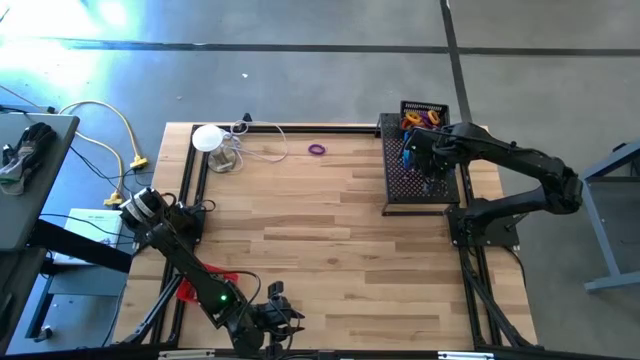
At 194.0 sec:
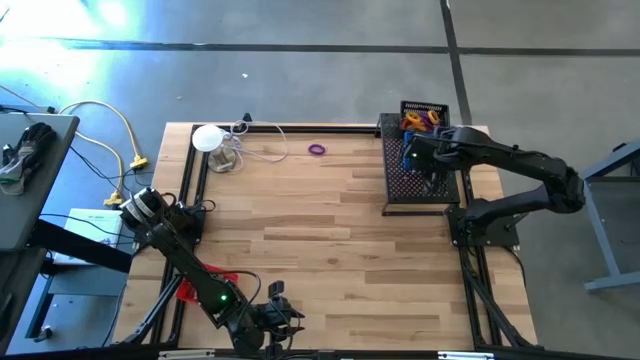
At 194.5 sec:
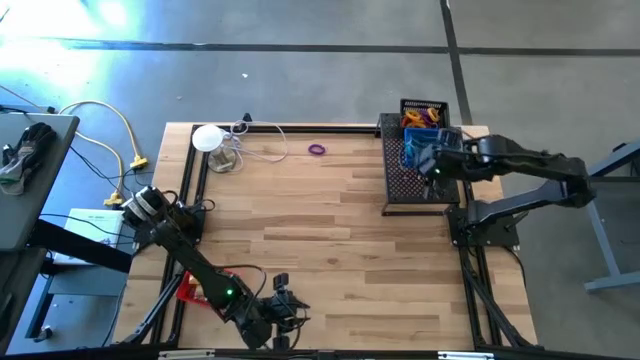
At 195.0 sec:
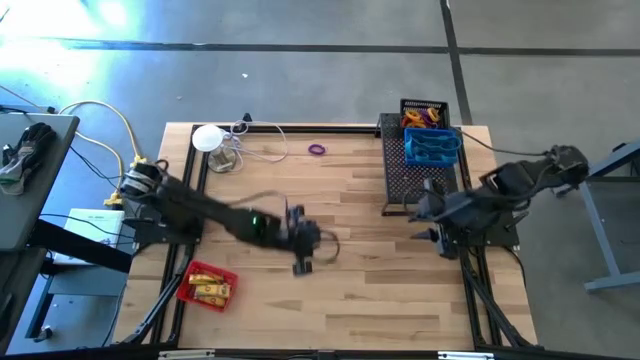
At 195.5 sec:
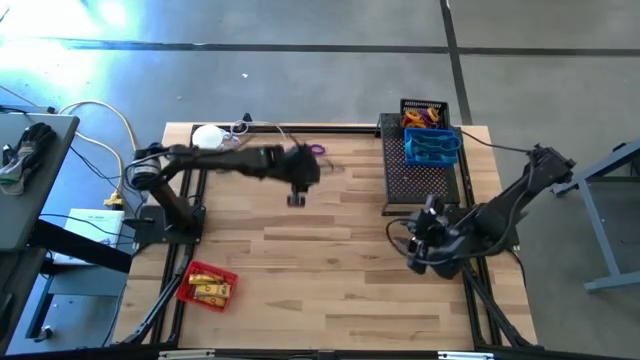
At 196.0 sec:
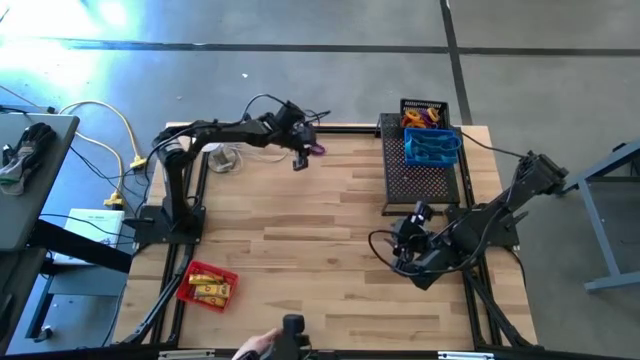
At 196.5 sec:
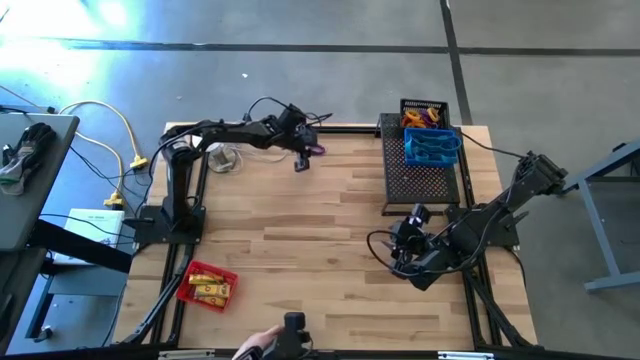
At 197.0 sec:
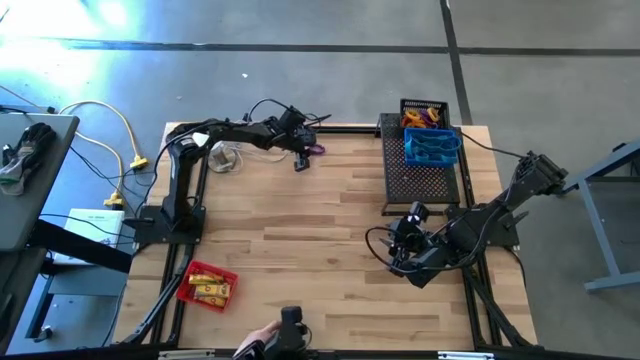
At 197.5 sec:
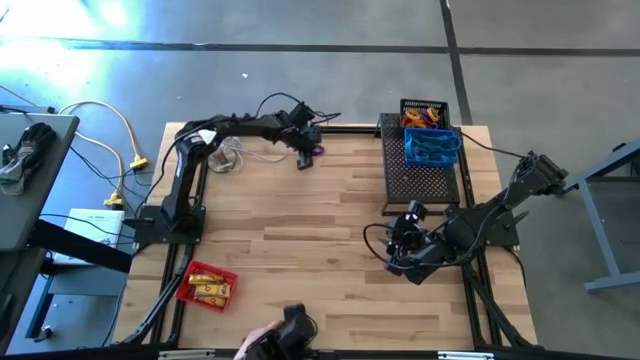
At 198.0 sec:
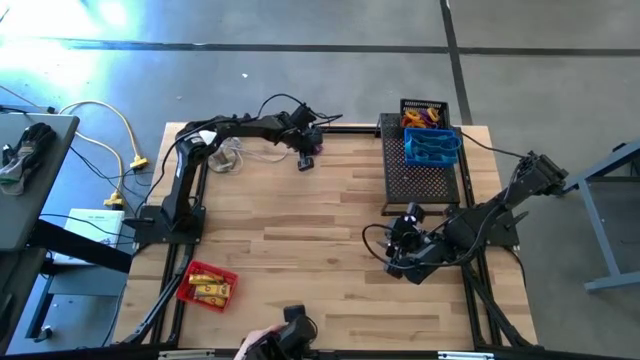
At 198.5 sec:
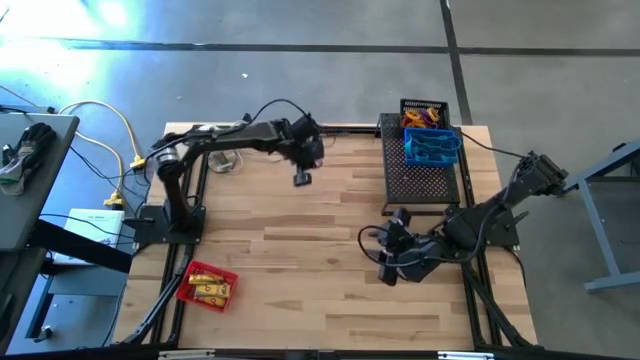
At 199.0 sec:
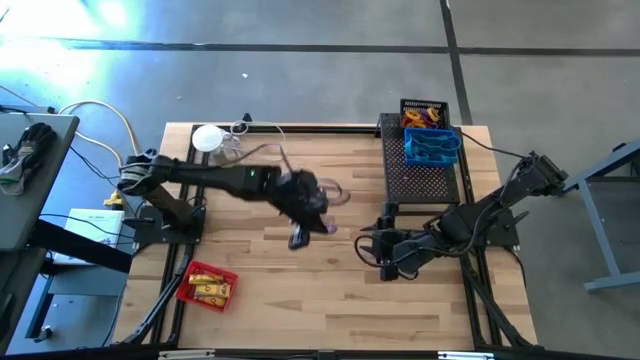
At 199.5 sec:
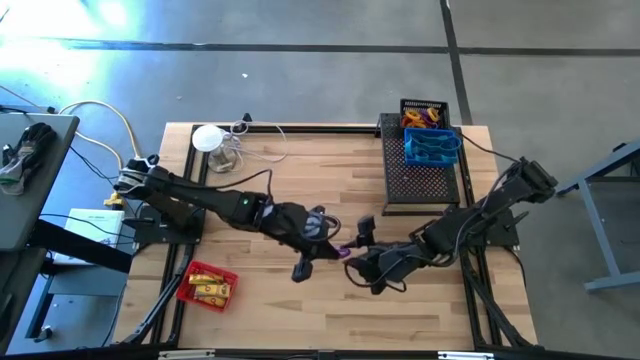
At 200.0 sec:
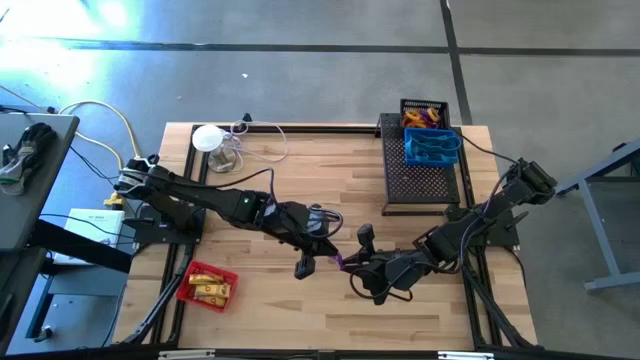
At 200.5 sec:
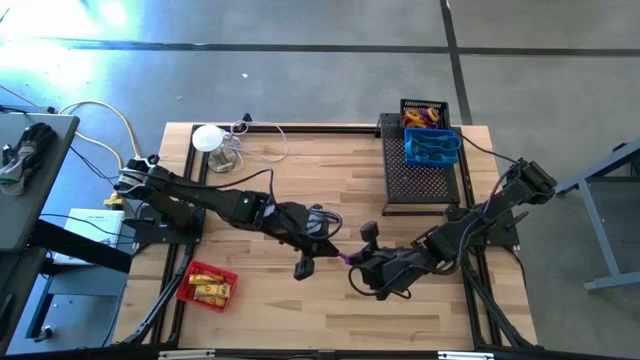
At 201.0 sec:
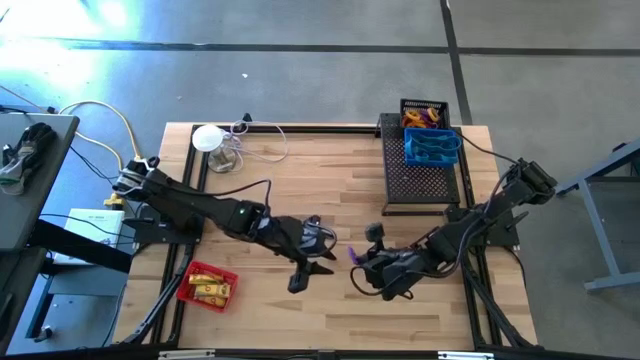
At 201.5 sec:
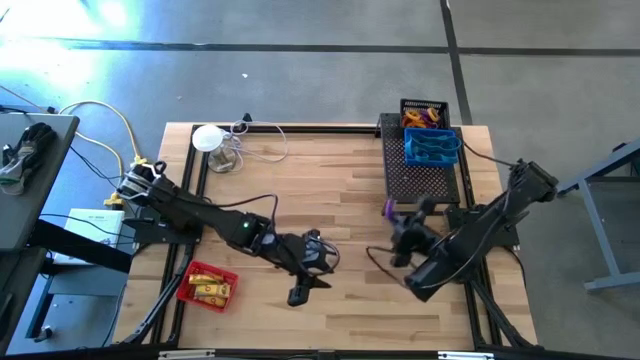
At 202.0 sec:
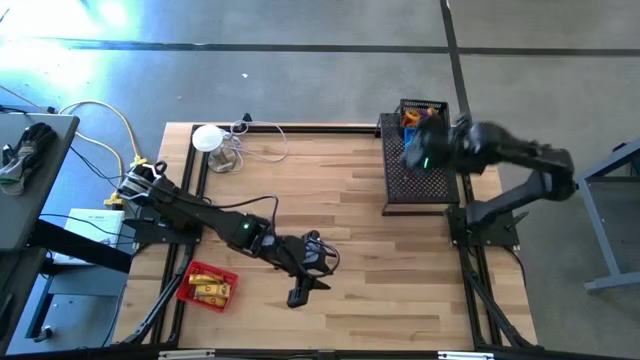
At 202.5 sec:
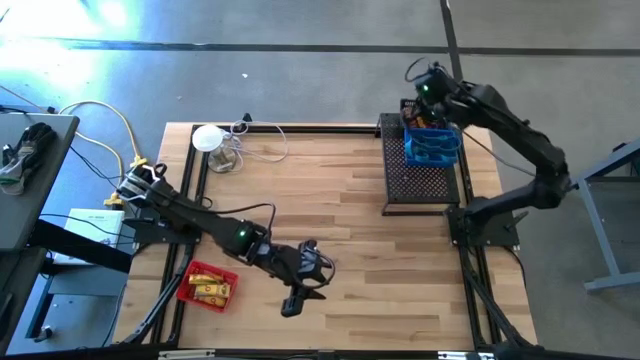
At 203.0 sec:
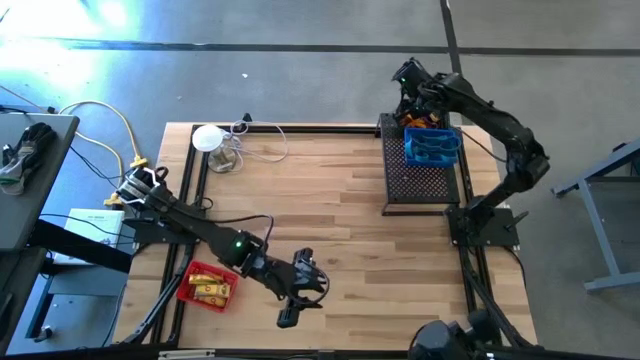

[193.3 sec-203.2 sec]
Task: Pick & Place Office Desk Supplies
Put the purple wrist coil keychain into the black bin on the shelf

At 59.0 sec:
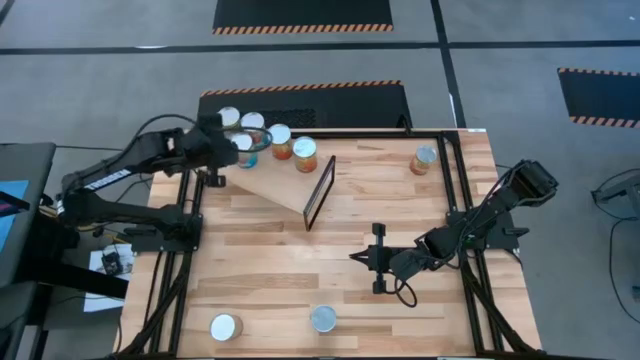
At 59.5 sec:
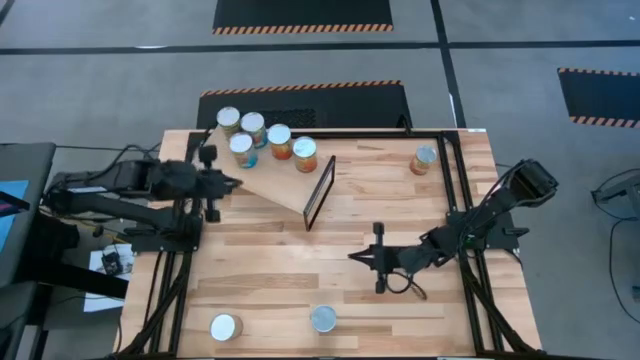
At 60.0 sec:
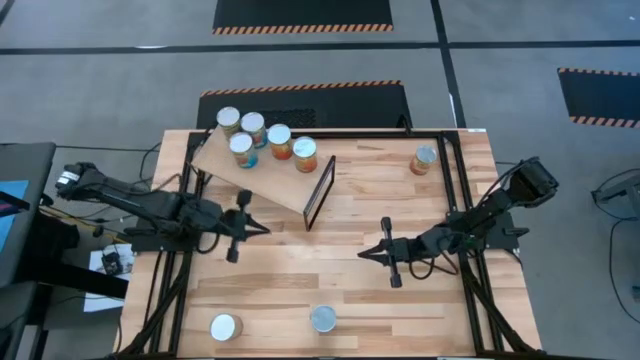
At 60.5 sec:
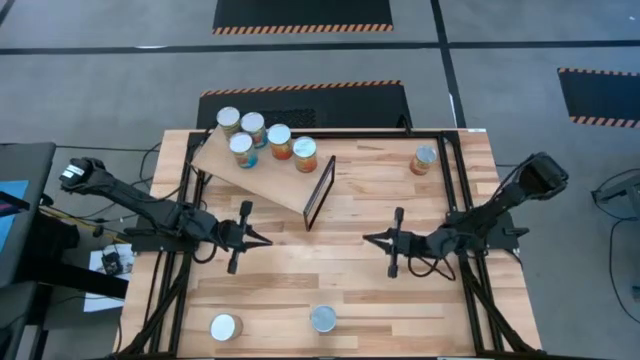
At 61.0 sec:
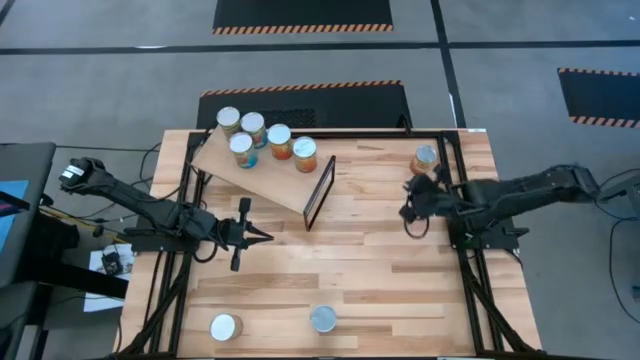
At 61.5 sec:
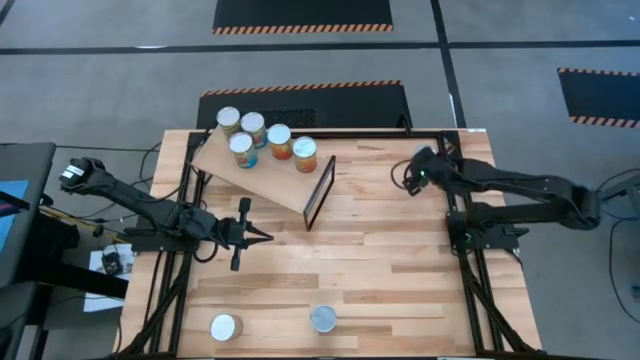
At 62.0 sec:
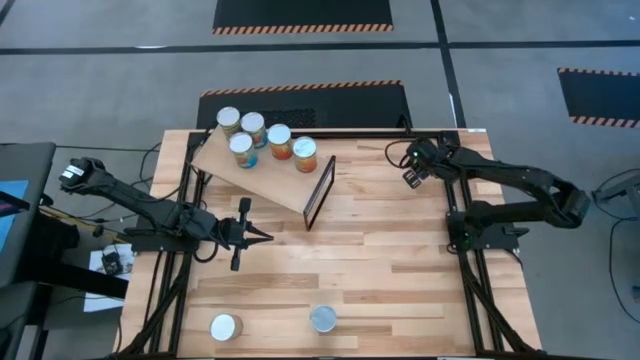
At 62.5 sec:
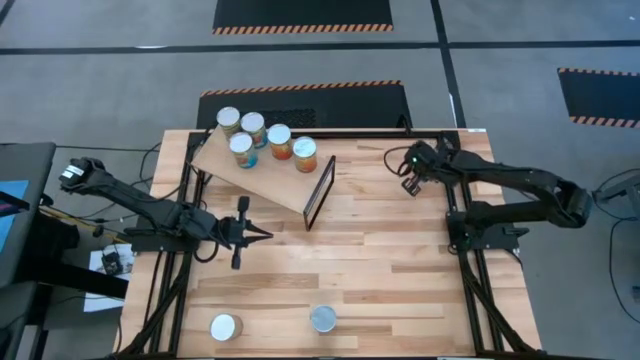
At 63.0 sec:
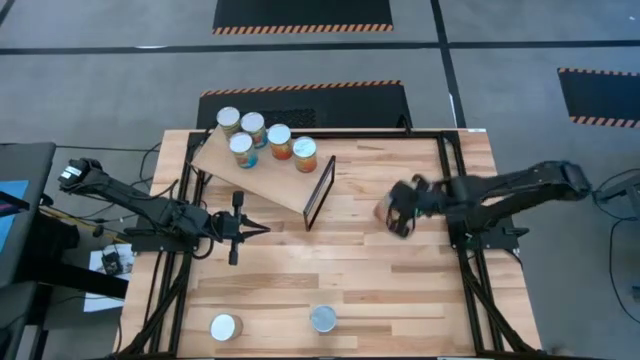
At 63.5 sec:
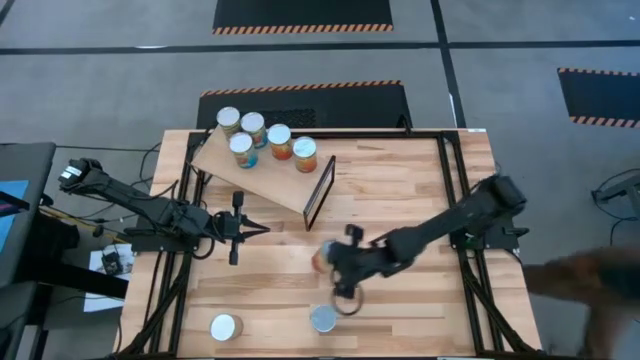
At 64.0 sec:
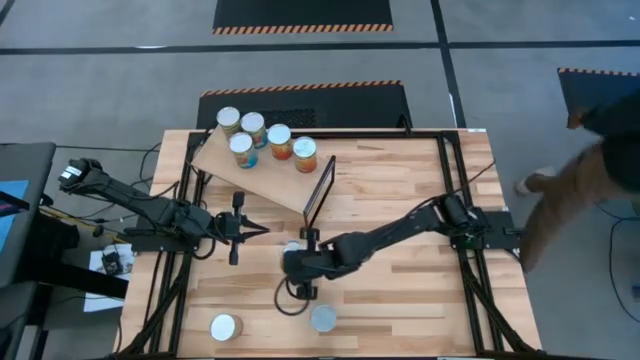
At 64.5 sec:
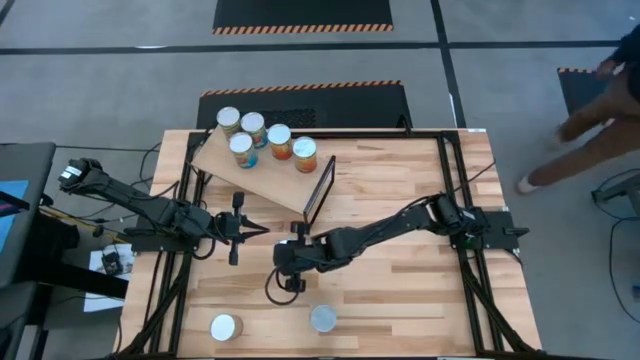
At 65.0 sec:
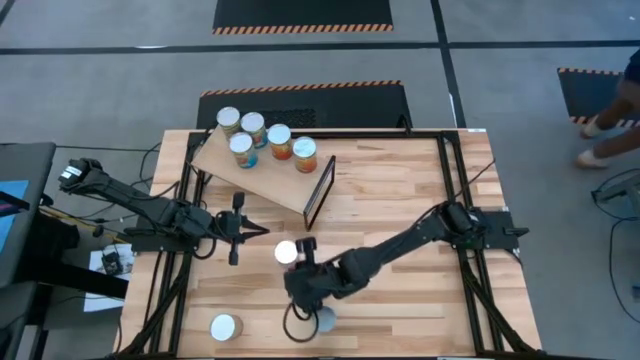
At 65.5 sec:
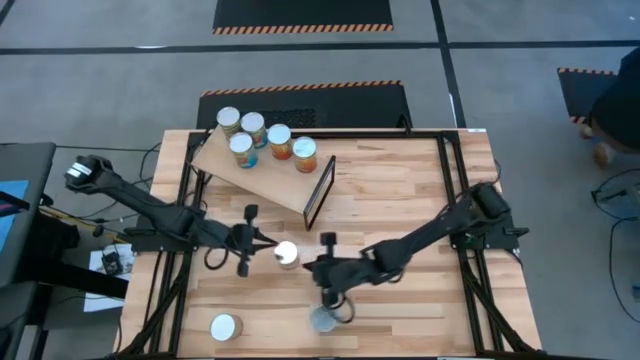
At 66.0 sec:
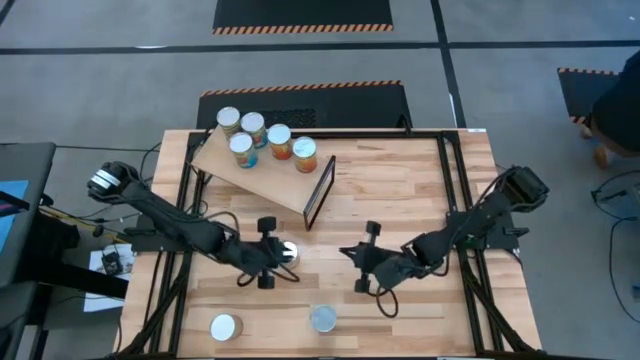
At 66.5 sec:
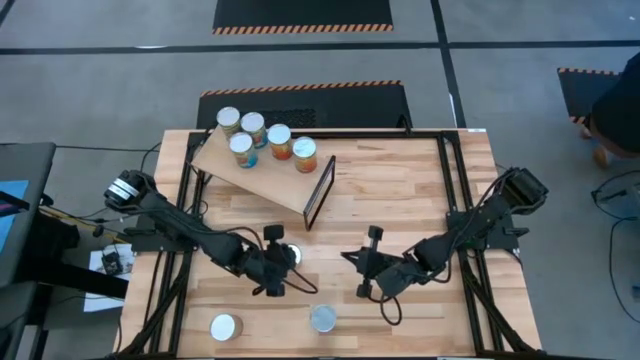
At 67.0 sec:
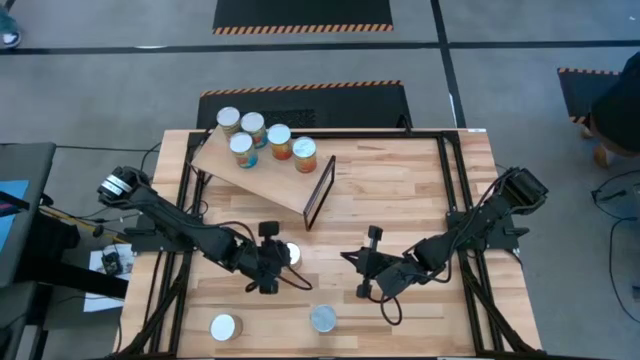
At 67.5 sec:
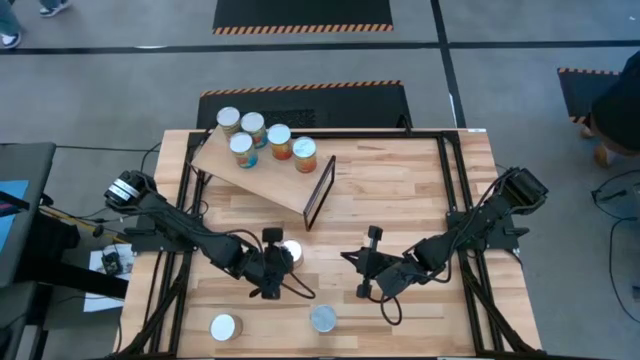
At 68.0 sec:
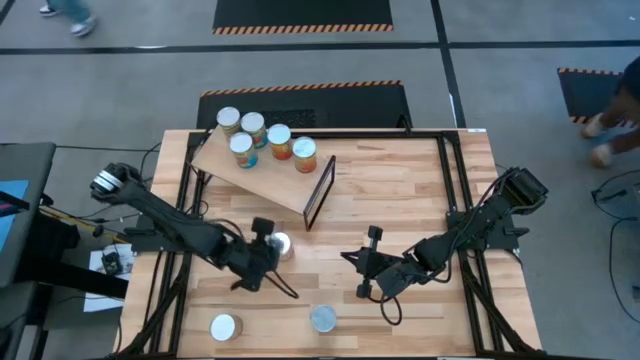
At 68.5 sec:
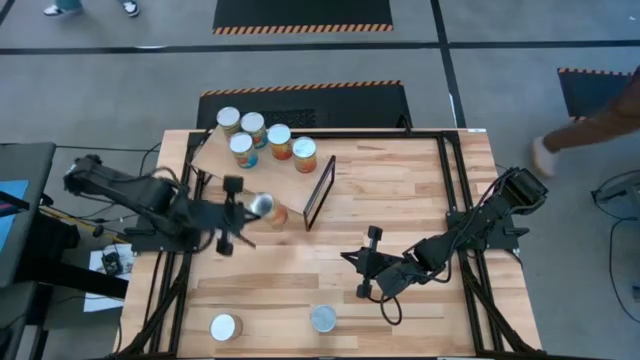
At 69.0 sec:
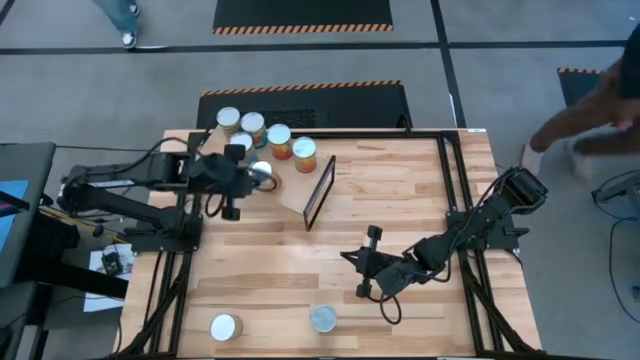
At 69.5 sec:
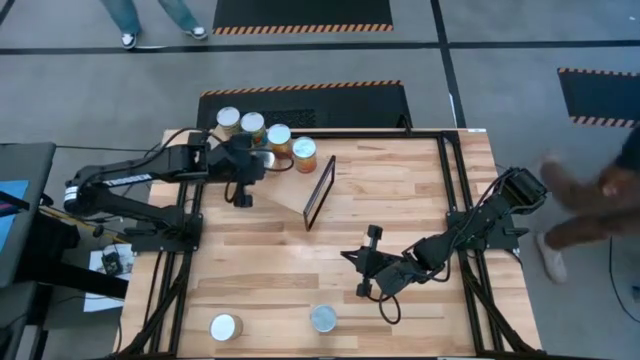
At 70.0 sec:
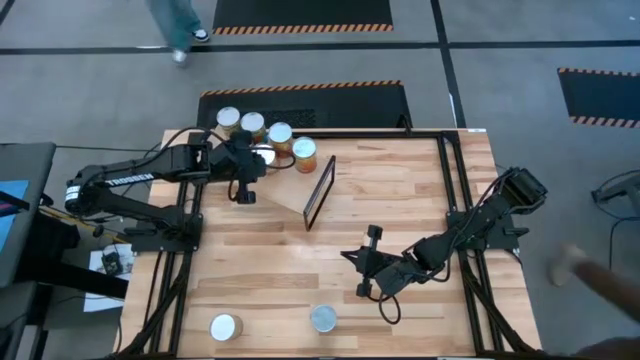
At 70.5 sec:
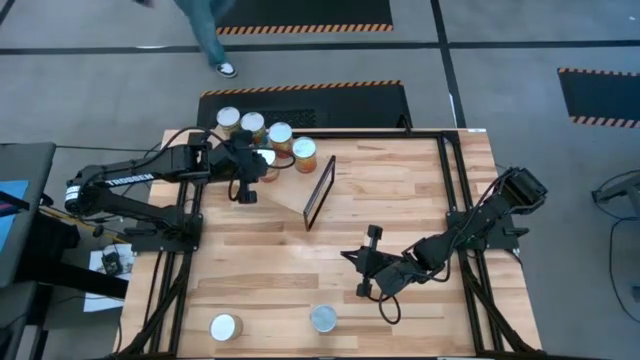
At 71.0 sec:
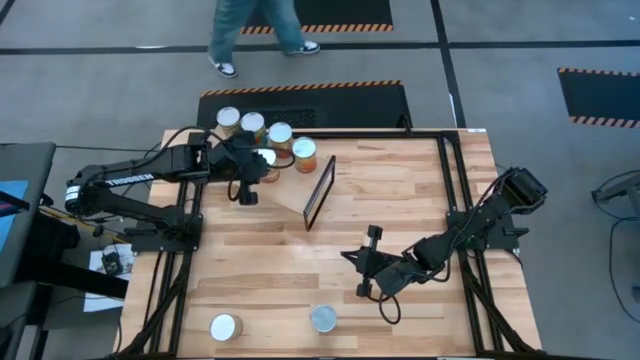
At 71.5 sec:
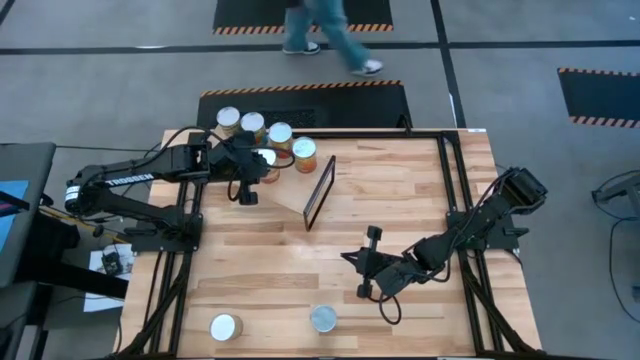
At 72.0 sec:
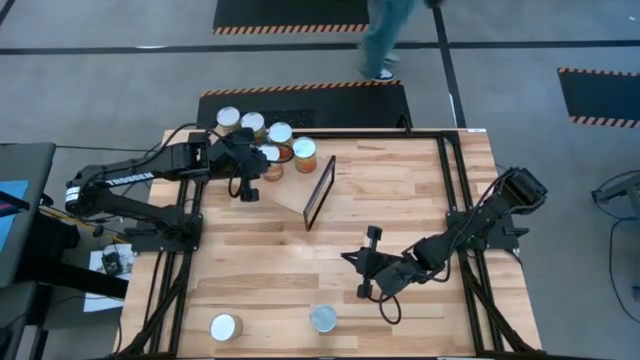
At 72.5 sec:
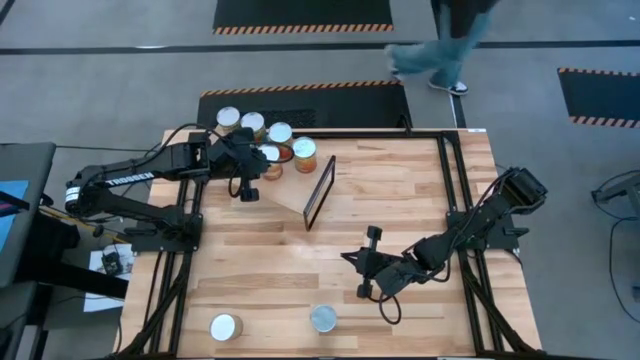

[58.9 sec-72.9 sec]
Task: Pick and place cans onto a shelf
Align the canned corn with the other canned tomatoes on the shelf
